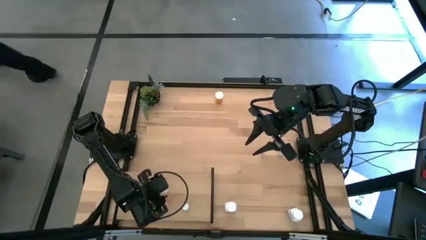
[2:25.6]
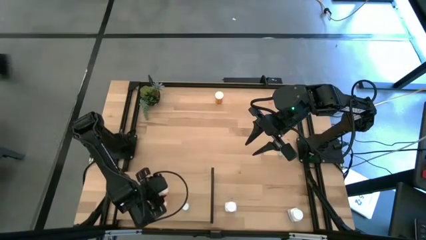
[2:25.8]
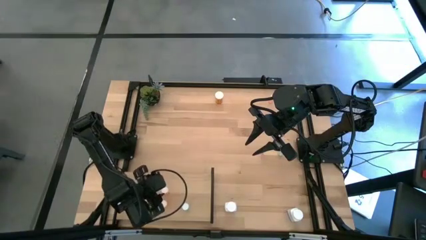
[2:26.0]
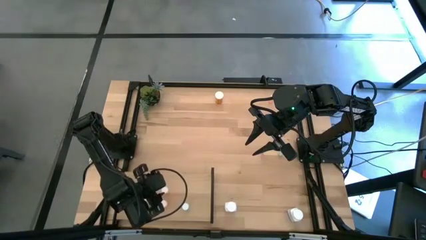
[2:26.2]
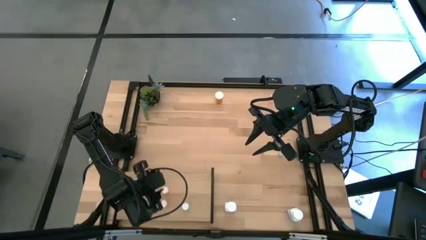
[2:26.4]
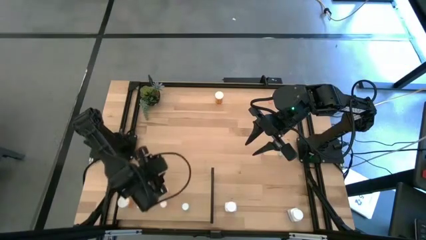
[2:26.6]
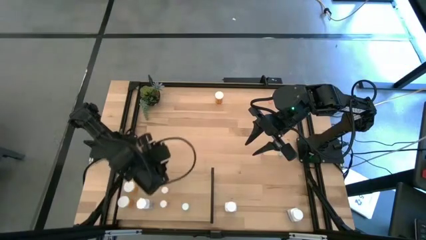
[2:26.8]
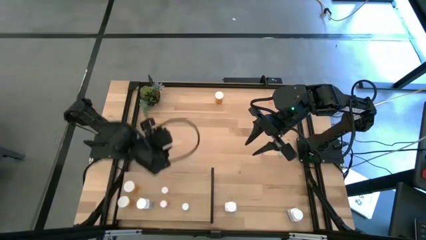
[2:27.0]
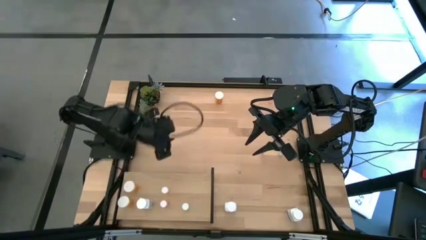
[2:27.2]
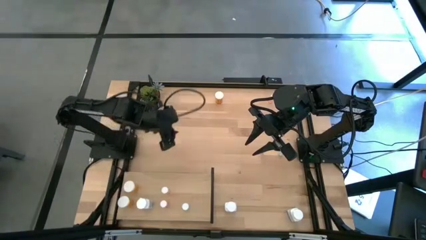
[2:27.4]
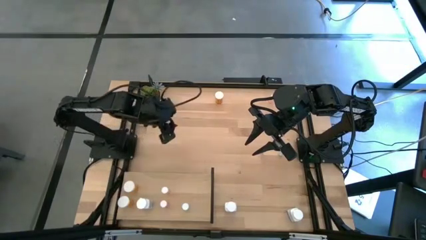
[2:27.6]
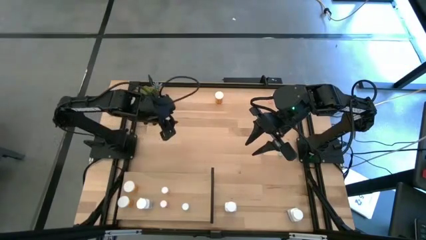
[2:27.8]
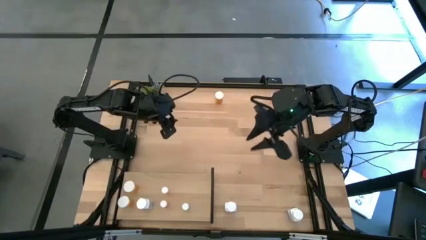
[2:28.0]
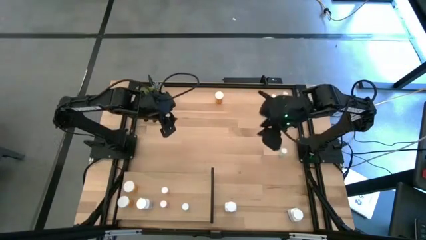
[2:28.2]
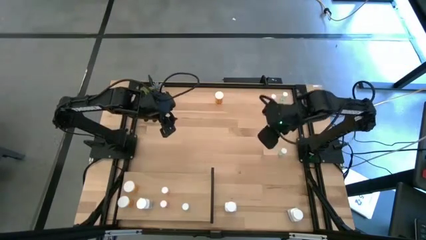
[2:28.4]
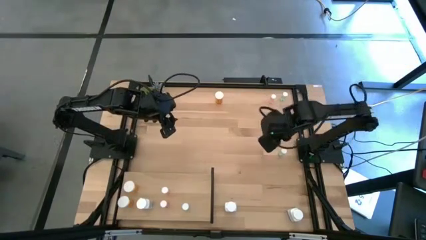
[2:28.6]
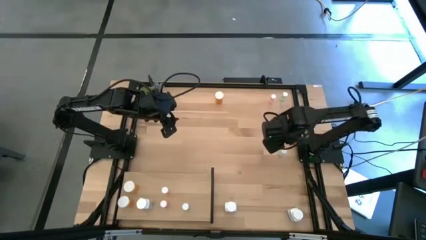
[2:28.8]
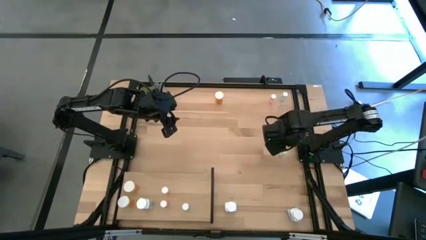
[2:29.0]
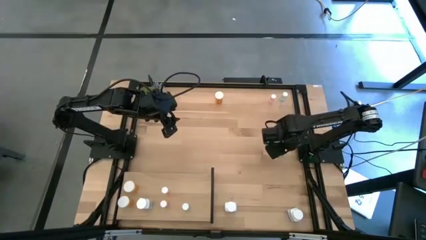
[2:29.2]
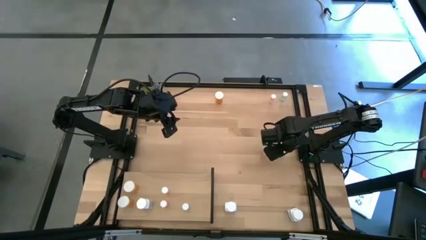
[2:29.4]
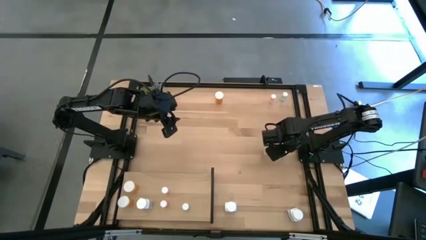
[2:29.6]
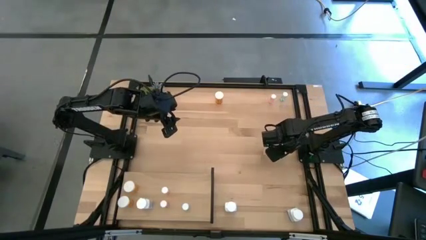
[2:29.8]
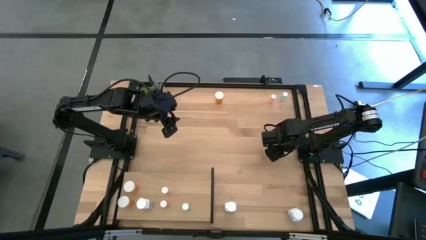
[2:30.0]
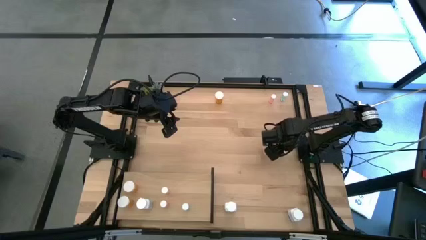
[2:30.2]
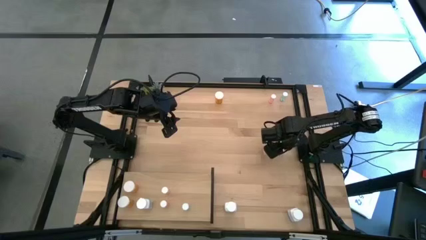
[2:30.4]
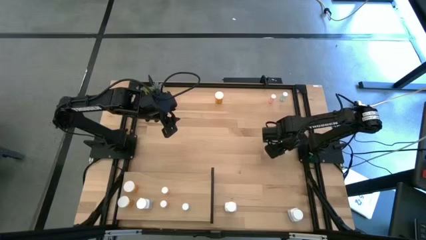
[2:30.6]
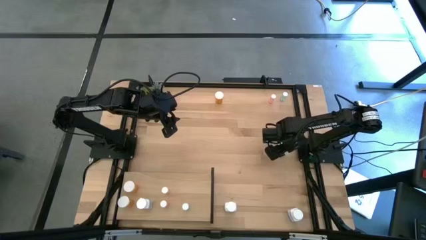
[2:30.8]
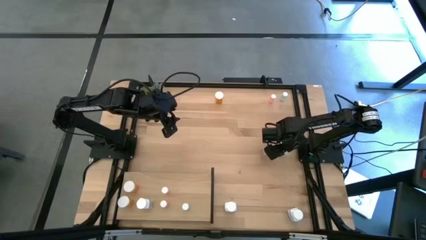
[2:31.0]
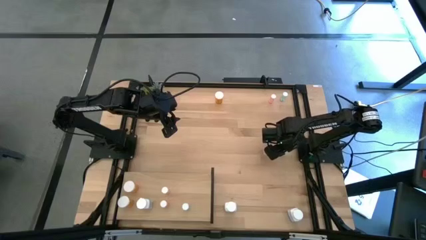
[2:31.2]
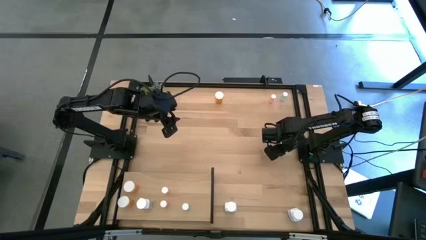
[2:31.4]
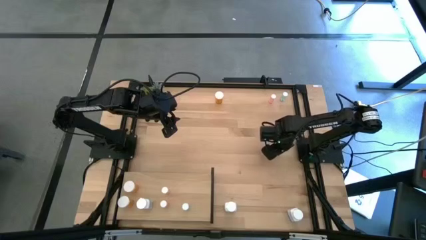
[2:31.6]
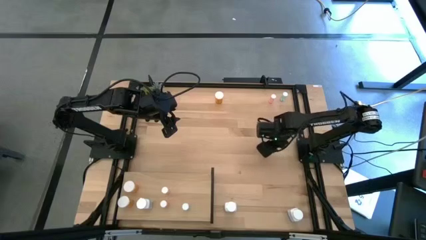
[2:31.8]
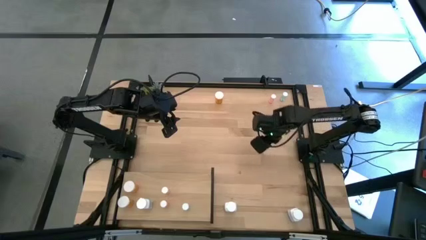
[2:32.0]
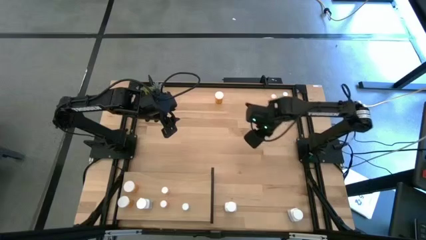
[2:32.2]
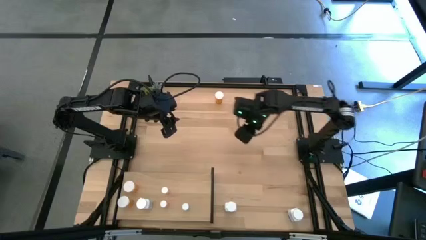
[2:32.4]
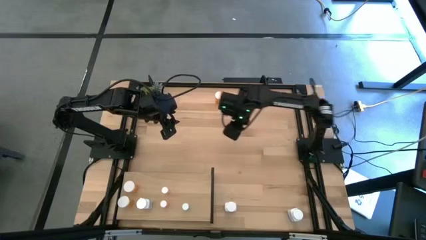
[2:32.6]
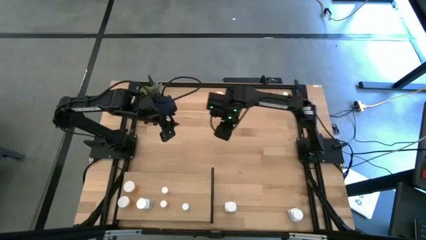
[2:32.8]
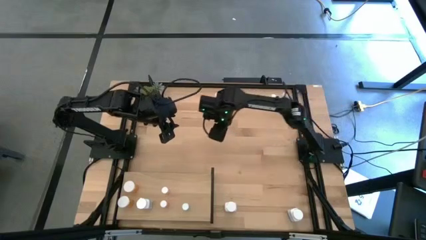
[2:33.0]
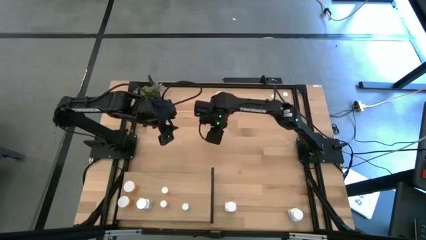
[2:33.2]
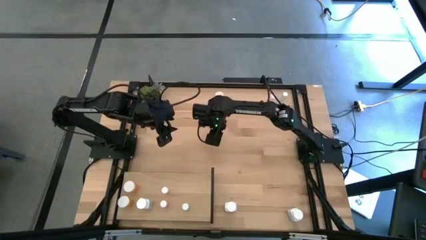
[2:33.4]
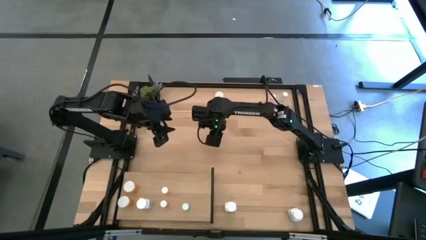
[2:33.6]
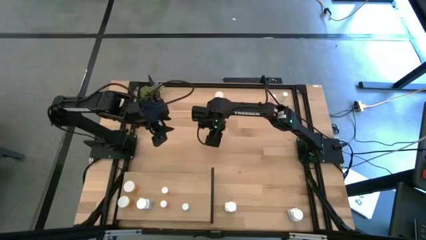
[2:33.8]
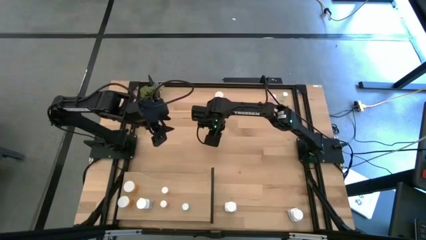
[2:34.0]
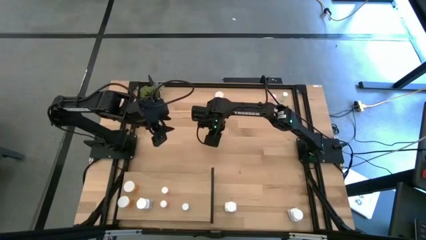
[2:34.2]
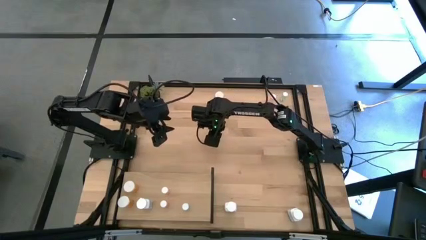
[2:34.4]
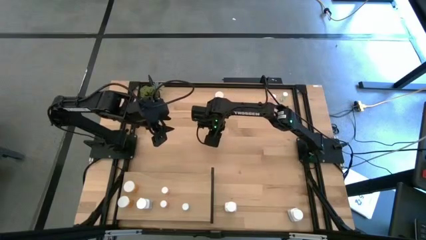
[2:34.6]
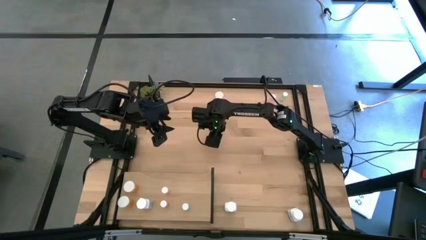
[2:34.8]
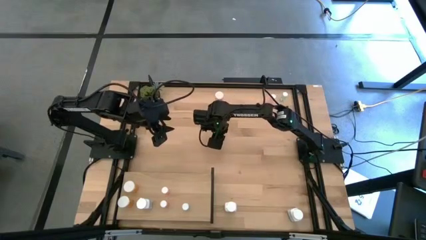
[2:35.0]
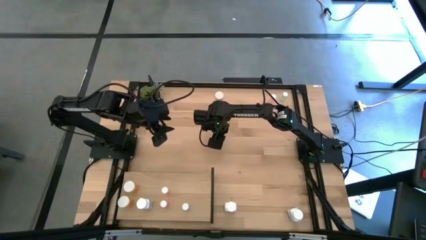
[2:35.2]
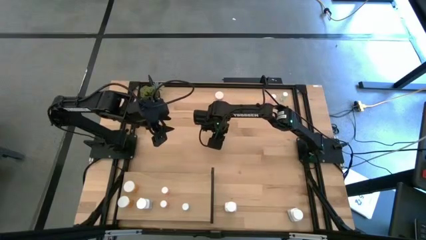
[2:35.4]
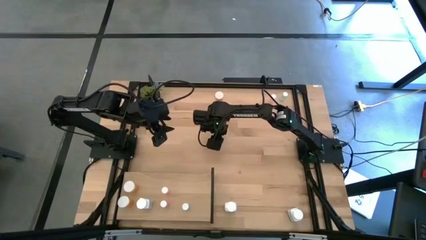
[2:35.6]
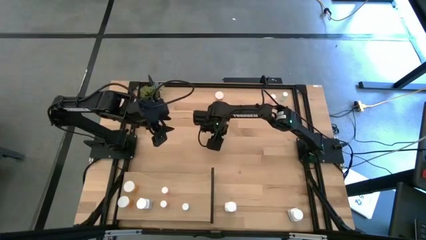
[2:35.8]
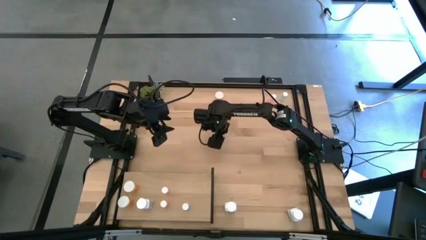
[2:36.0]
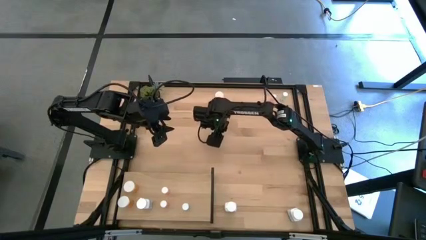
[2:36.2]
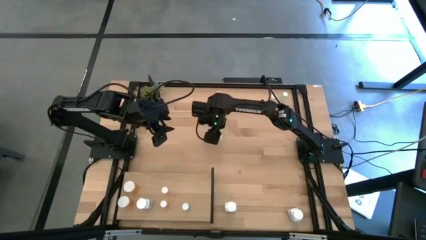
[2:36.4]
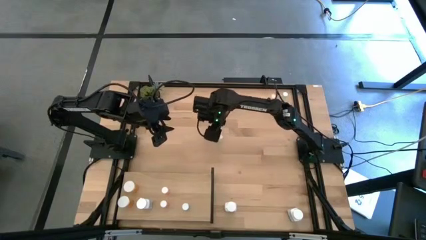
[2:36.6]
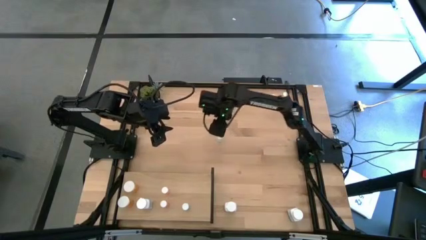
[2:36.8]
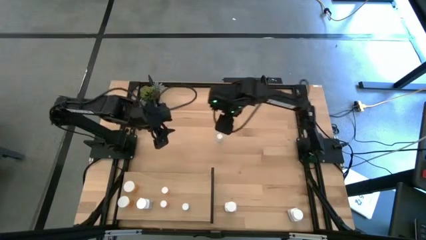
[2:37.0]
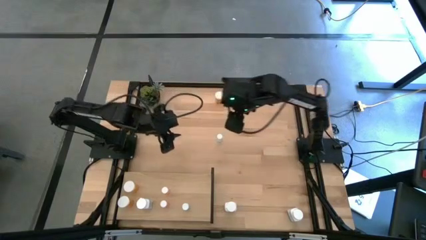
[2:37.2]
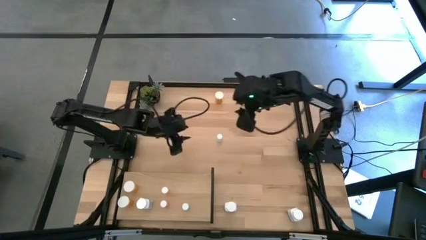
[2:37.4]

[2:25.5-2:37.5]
Task: Pick and place medicine bottles onto shelf by color
Put the bottom small blue pill bottle on the shelf aligned with the other small blue pill bottle
